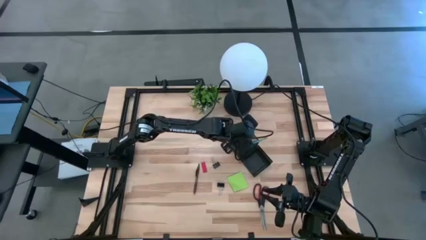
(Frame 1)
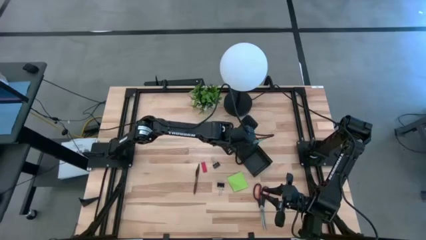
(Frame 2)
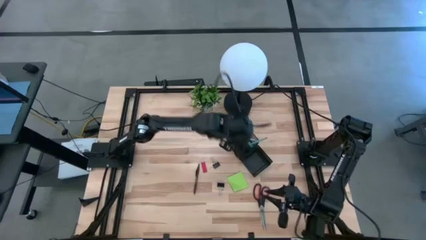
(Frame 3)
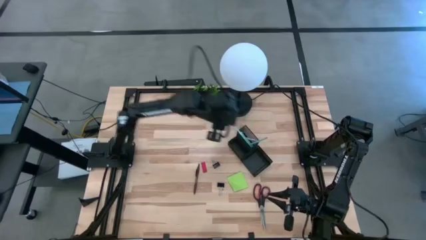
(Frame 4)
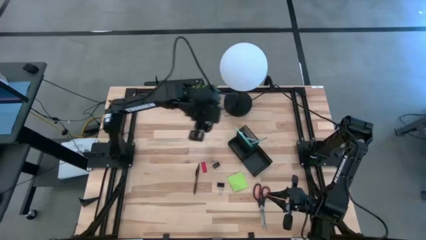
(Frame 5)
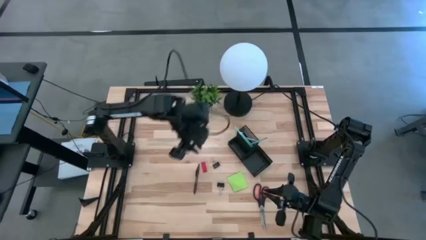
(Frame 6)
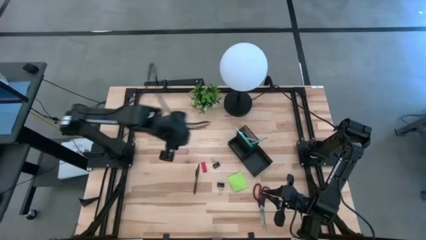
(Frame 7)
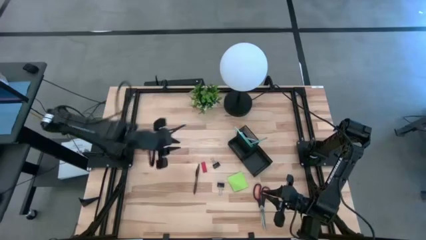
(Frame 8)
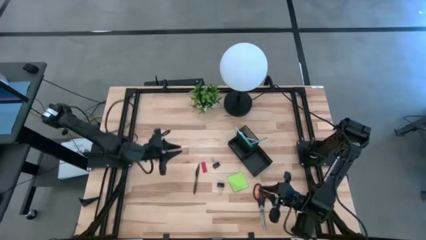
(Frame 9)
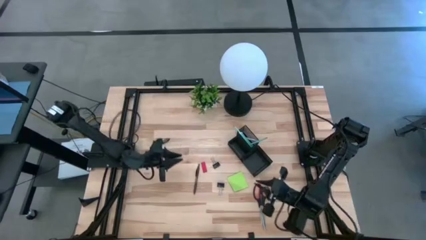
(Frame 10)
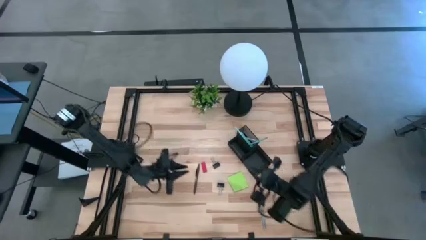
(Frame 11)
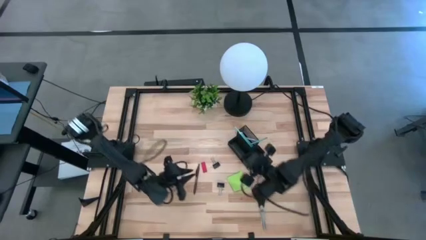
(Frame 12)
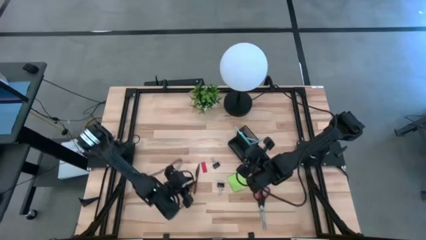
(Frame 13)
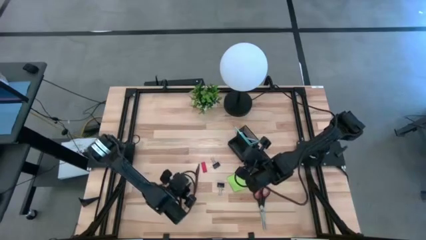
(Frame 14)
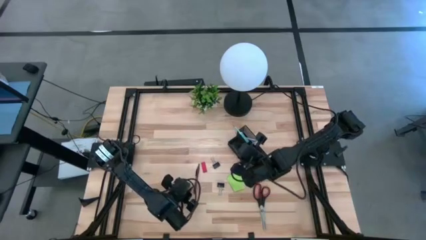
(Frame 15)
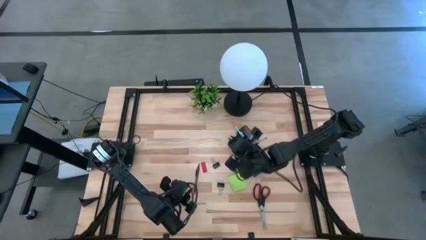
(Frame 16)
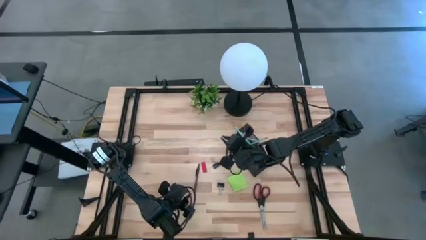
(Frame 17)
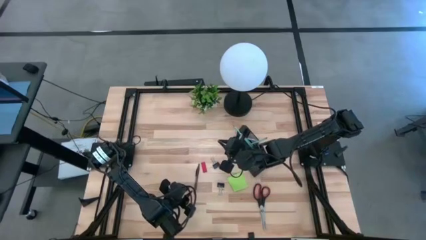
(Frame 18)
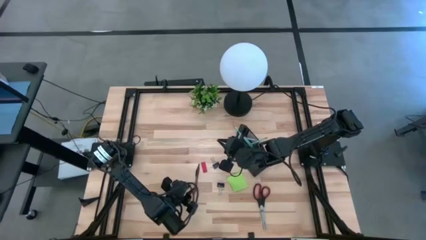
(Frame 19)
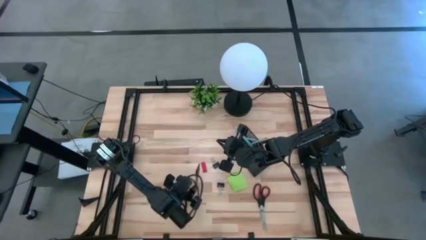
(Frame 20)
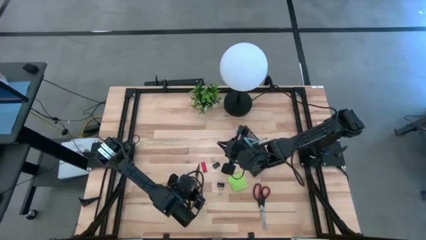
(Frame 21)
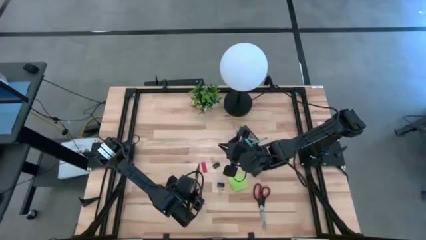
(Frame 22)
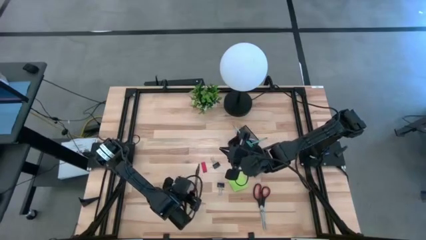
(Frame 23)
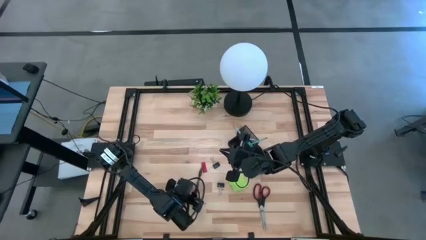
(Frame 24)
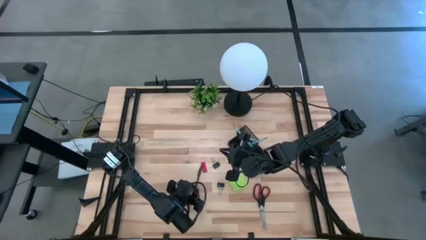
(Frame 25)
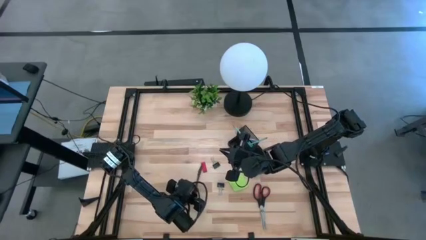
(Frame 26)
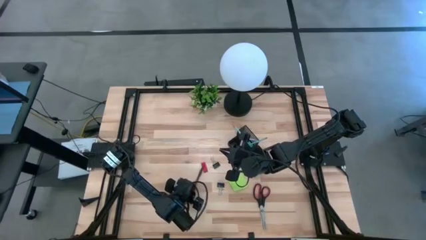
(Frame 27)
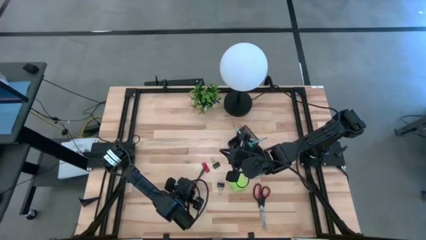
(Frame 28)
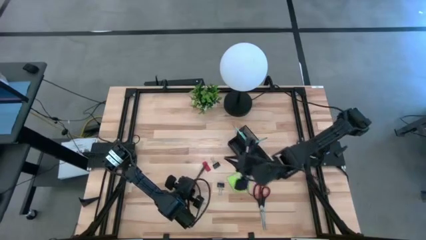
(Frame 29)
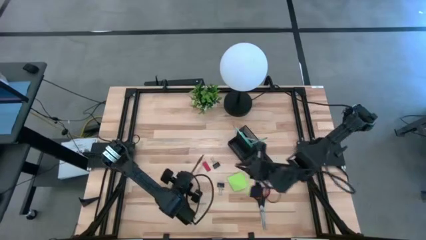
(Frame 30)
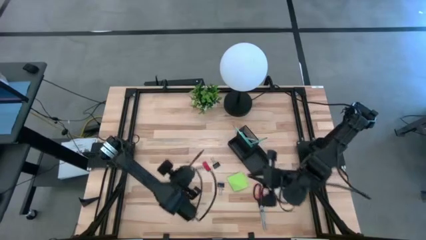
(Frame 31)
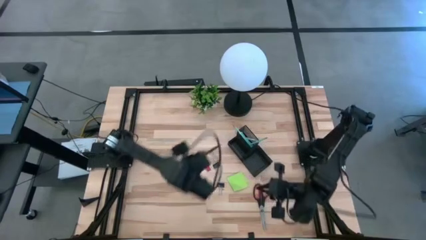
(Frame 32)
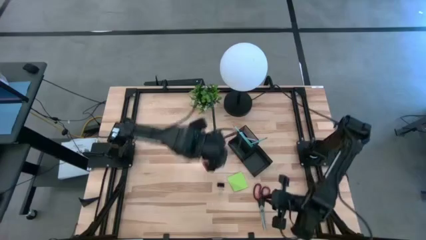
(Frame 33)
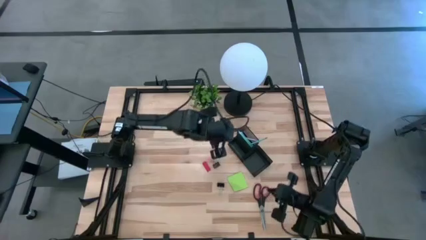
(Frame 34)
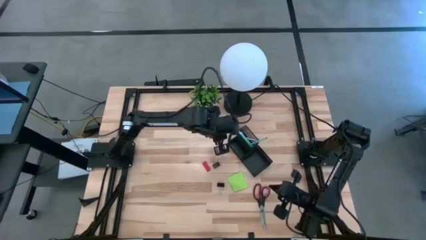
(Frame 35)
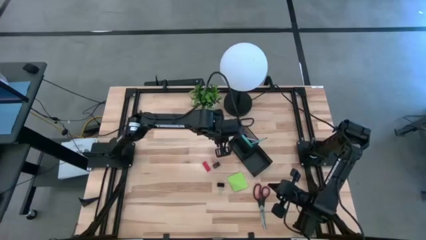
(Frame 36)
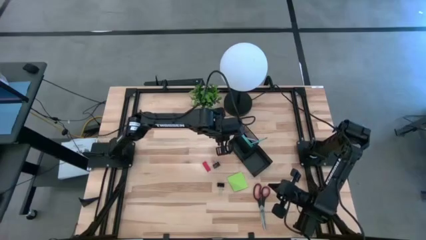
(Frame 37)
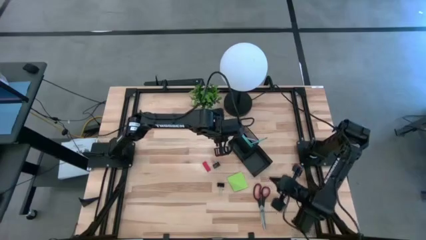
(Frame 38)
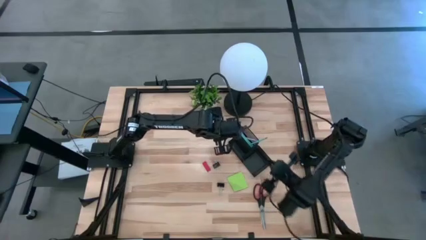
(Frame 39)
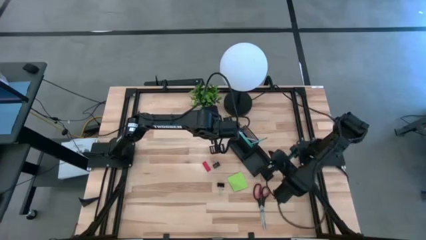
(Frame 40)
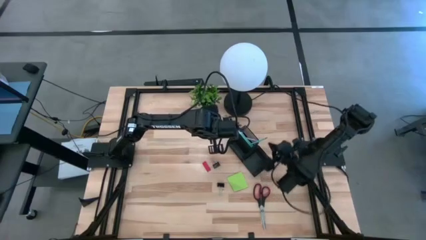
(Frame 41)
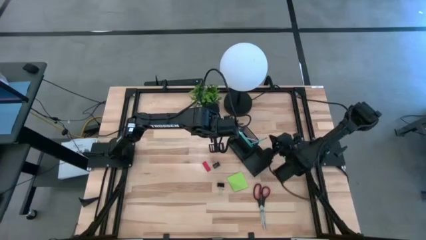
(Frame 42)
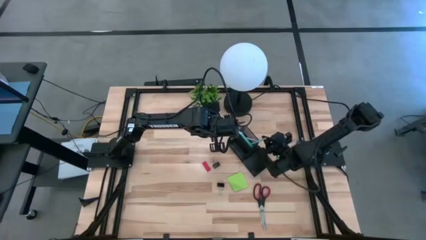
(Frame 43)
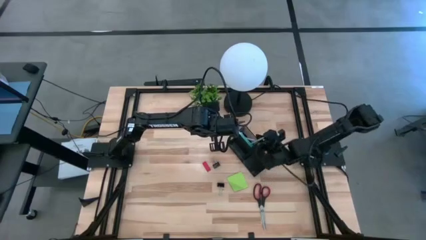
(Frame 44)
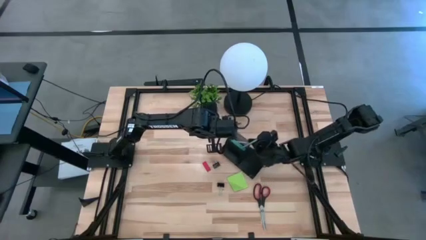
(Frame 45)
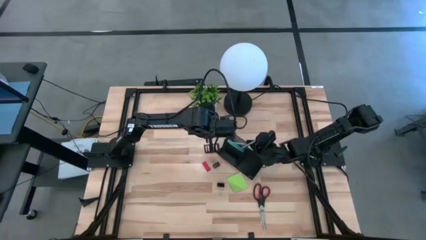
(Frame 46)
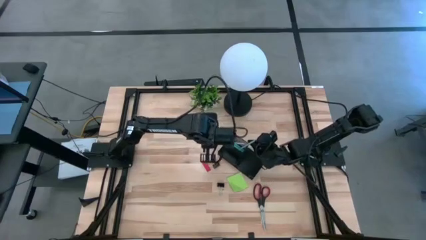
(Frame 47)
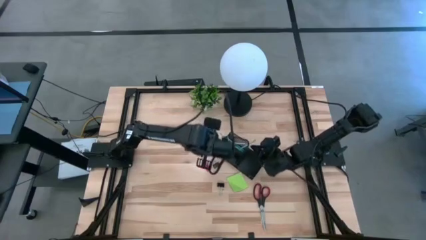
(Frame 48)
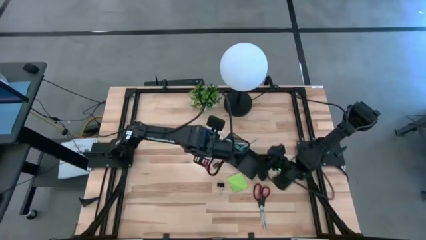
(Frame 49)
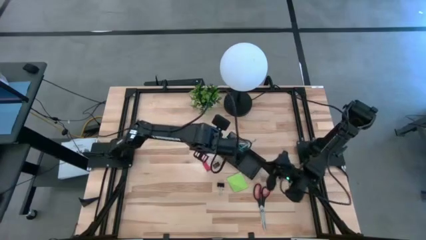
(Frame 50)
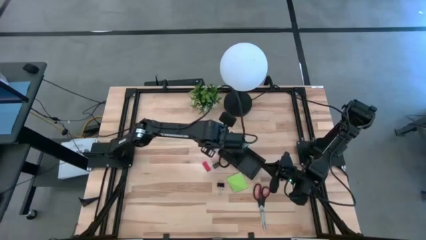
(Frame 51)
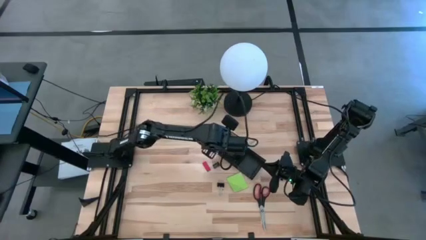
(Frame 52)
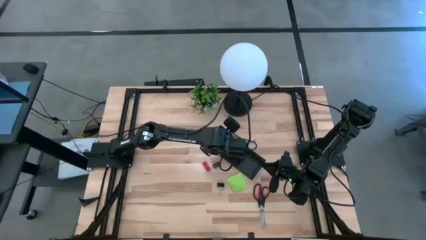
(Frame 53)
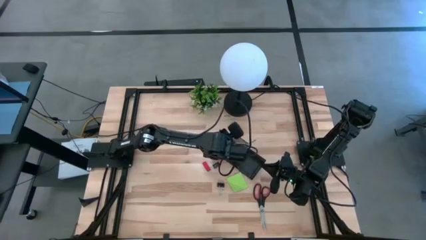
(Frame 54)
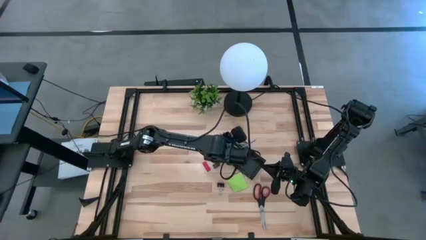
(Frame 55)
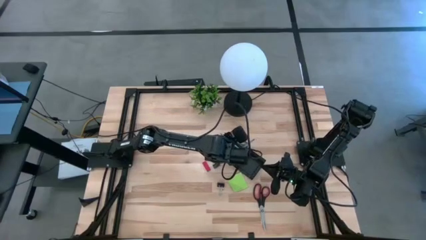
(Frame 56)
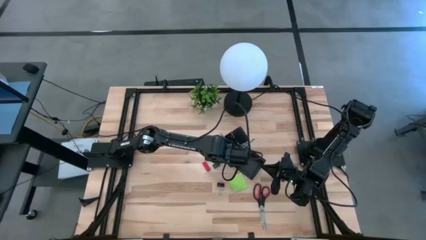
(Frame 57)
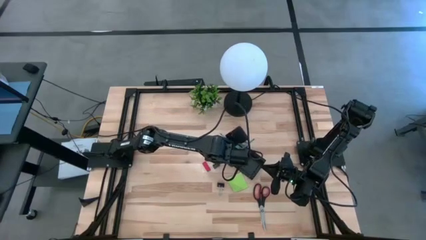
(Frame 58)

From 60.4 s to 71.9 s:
Task: Pick and place office supplies into organizer
Put the brown ballpoint pen into the desk organizer

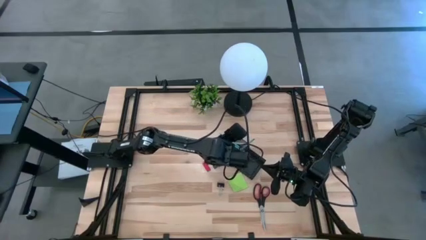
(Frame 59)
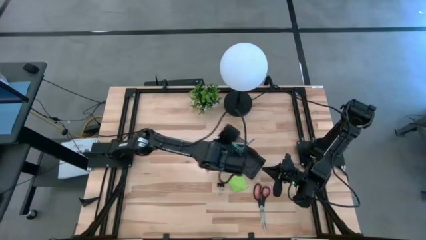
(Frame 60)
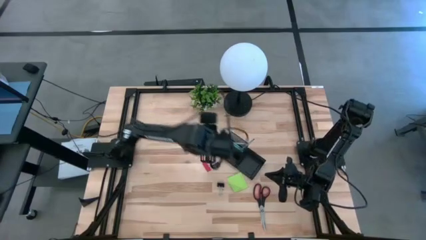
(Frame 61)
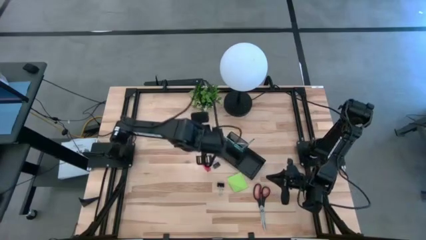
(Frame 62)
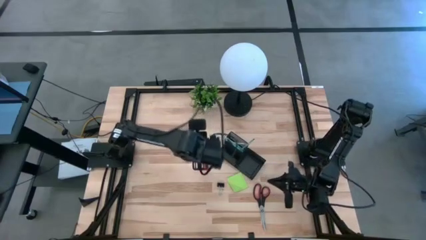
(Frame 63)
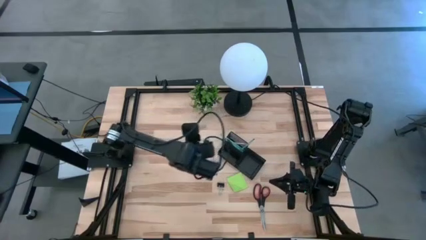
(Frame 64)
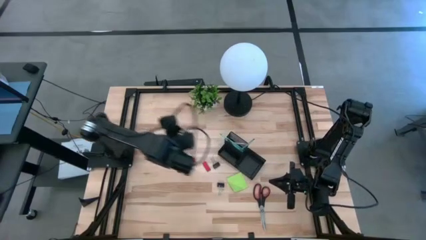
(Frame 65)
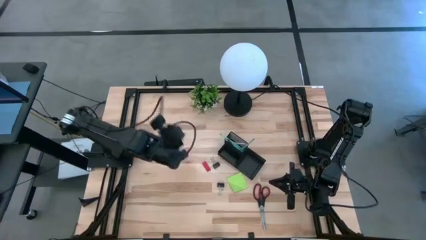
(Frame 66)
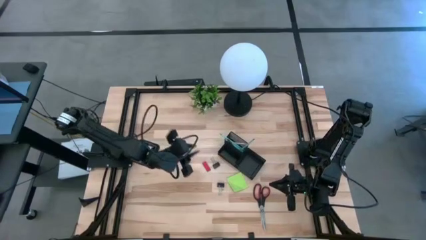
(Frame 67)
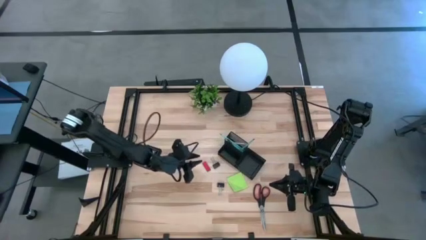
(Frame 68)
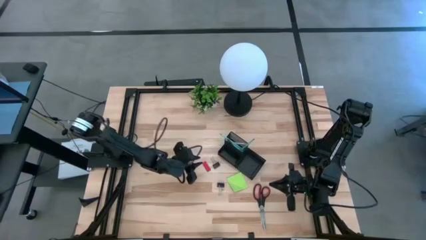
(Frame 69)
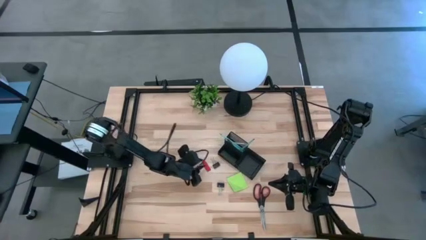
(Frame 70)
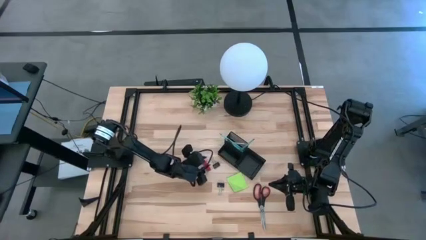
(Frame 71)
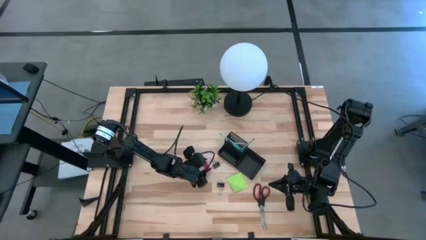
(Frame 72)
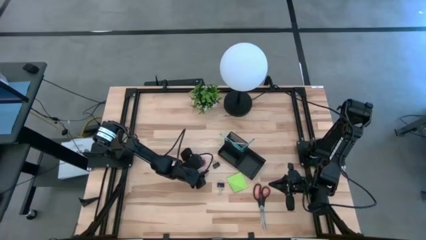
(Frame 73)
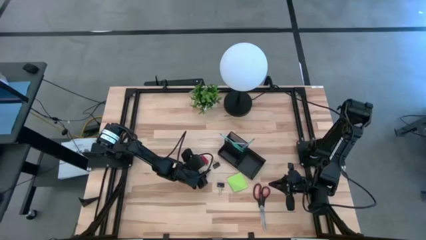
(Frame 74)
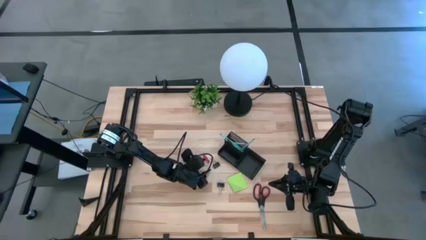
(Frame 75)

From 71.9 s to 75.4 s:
Put the red eraser into the desk organizer
